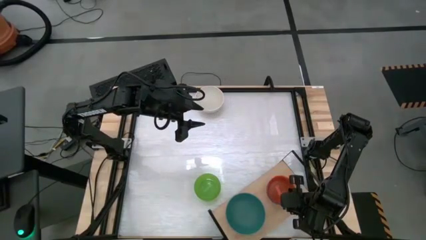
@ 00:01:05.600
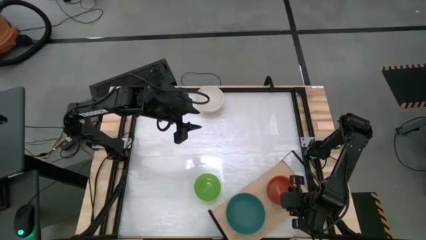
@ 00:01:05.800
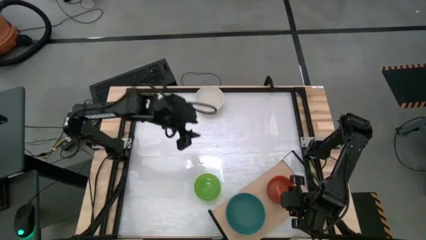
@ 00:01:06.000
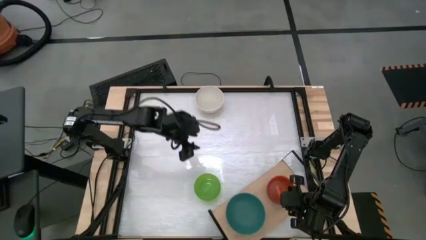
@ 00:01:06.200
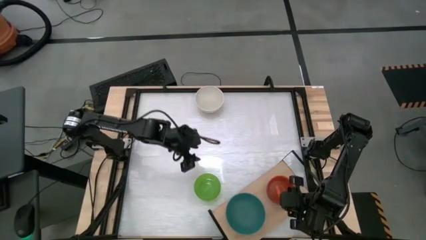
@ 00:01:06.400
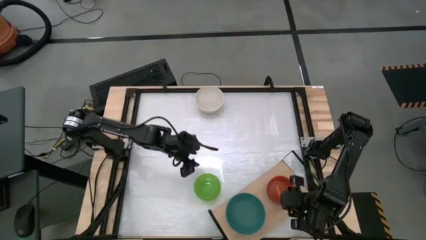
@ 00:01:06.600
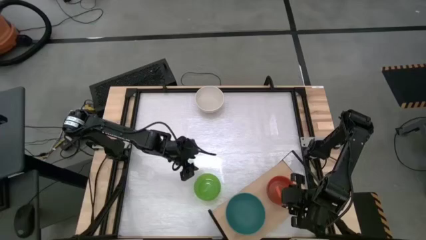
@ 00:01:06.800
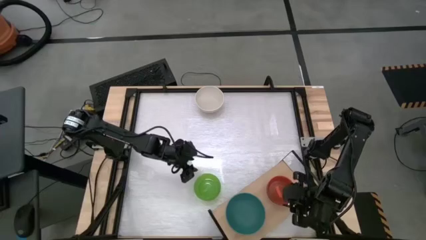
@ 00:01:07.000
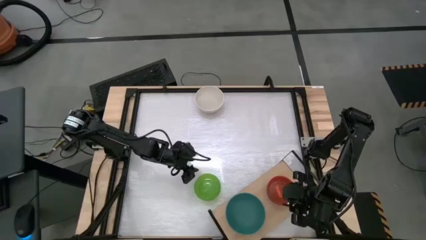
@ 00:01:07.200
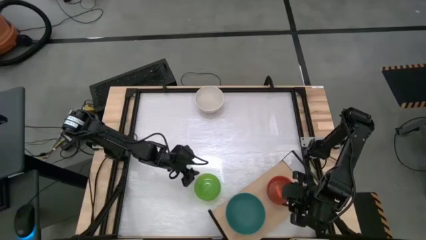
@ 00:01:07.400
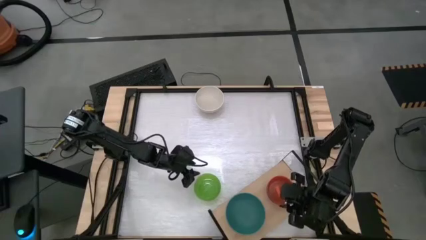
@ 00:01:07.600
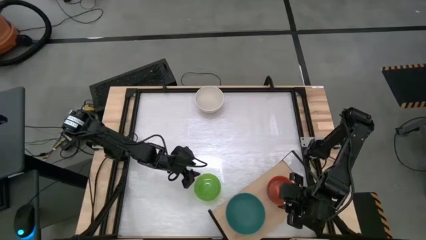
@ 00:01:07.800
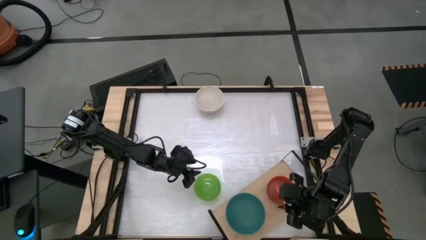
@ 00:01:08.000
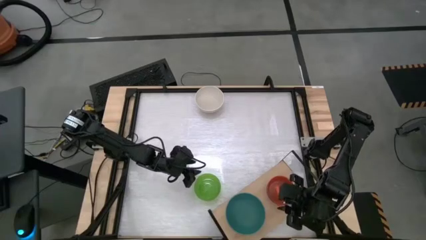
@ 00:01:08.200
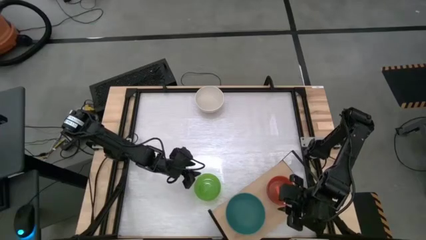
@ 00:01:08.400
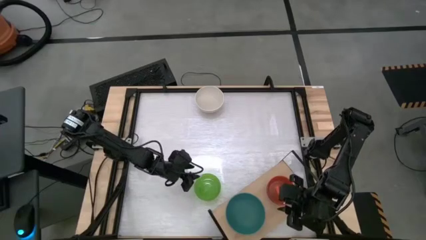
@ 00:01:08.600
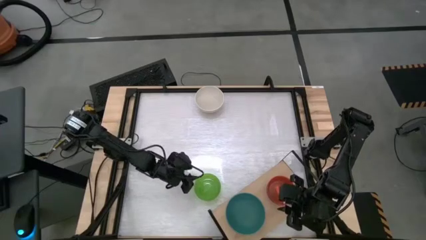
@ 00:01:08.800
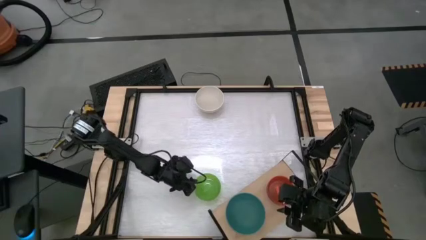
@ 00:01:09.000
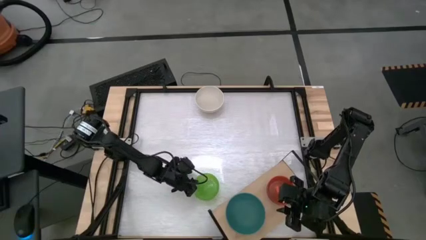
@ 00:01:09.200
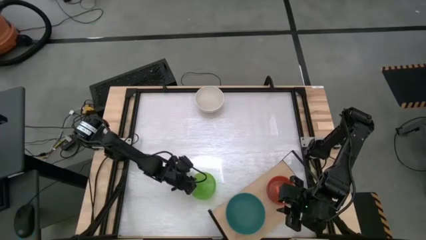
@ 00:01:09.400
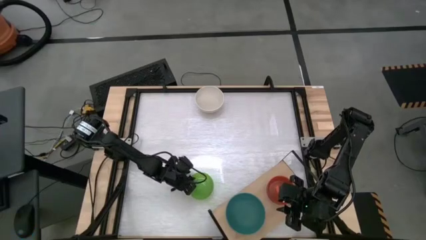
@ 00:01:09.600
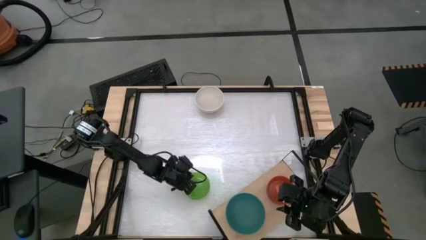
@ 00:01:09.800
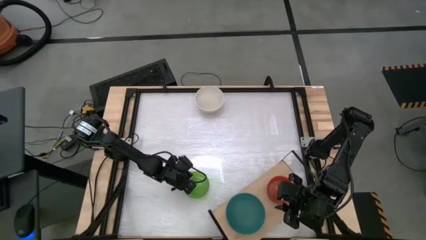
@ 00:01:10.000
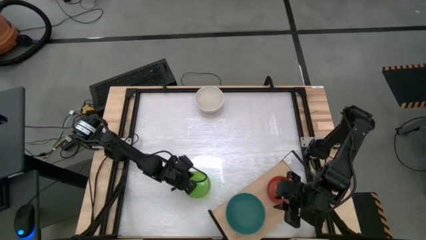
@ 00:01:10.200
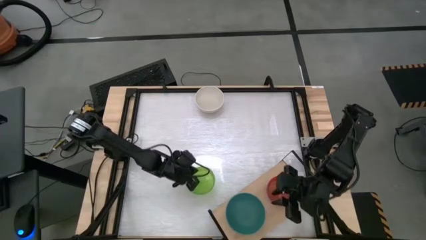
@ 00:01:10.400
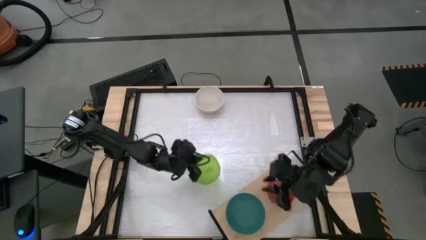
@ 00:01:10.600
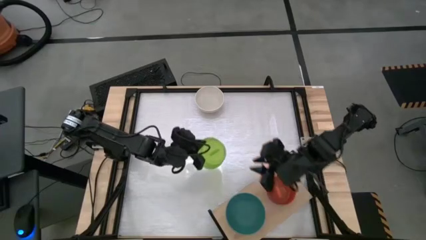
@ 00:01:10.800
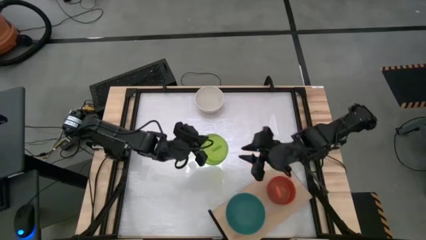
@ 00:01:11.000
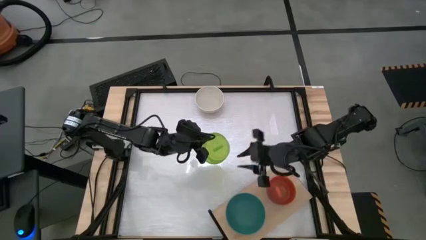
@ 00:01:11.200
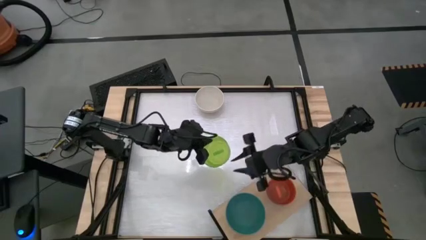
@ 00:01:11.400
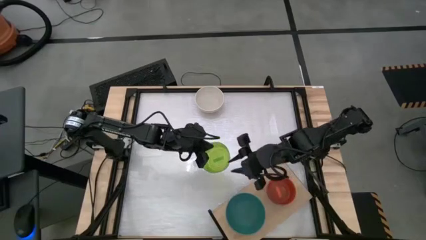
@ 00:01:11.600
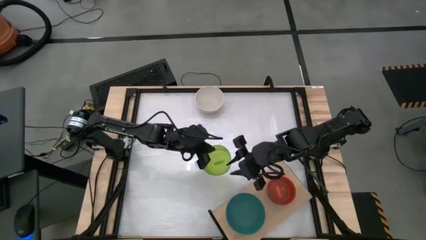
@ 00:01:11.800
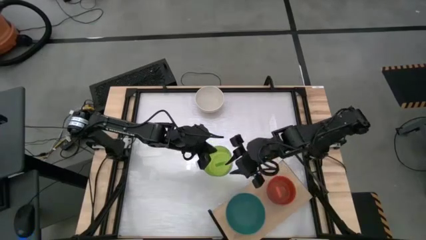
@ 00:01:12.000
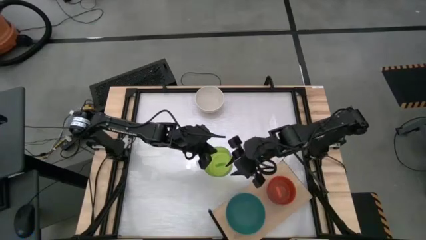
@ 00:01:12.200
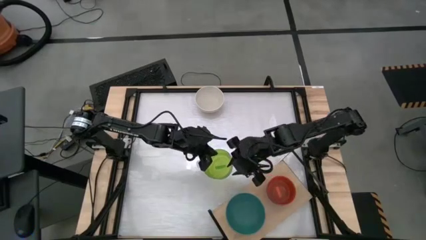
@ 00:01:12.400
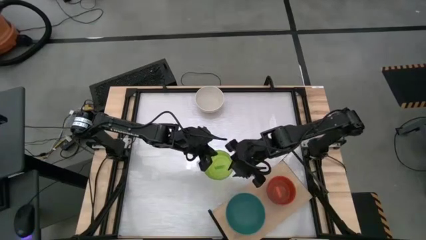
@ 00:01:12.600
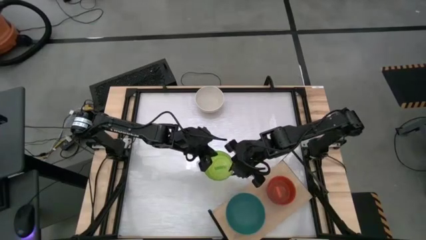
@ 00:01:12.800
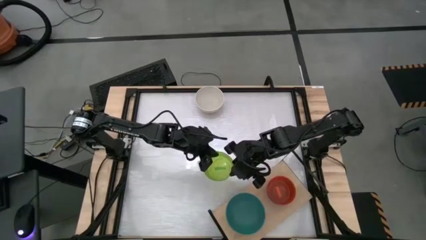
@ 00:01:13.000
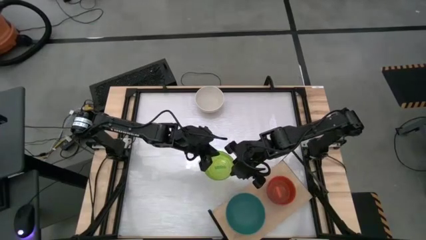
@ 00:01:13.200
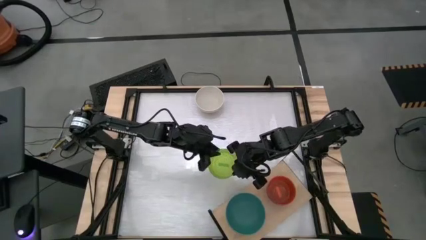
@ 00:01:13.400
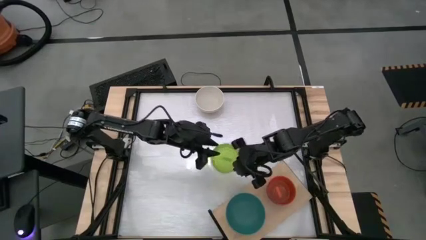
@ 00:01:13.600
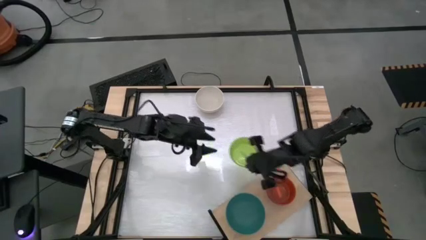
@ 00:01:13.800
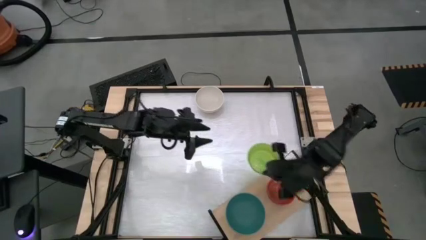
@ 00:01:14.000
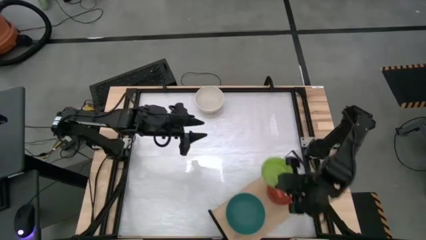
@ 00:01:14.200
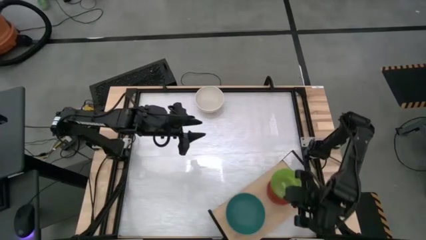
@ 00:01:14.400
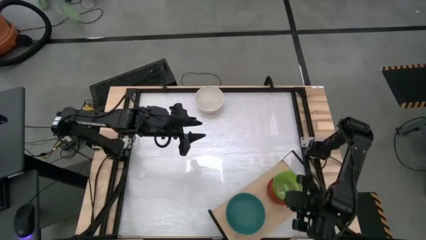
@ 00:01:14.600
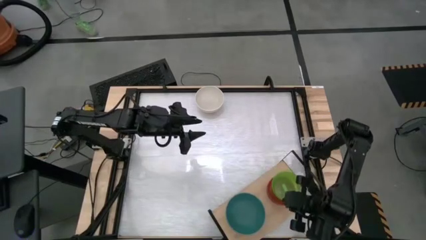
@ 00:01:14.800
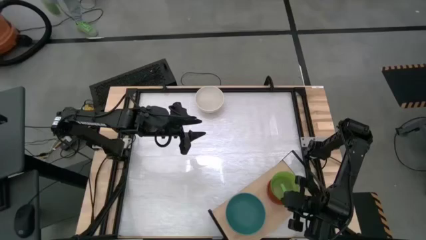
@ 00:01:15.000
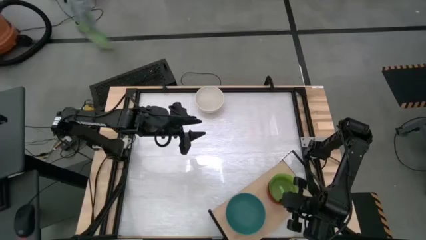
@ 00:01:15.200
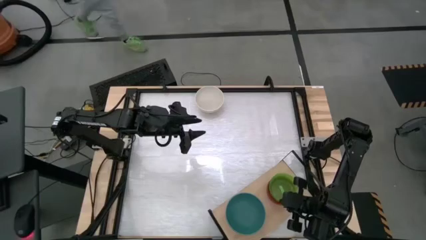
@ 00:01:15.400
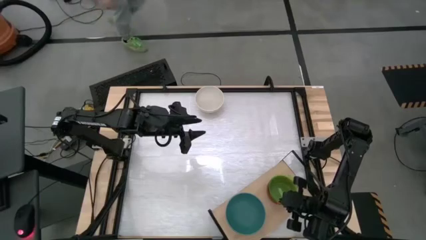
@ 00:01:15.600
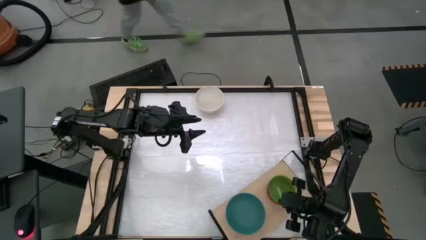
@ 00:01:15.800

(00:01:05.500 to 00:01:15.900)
Task: Place and stack bowls onto a shelf
Stack the green bowl on top of the orange bowl on the shelf

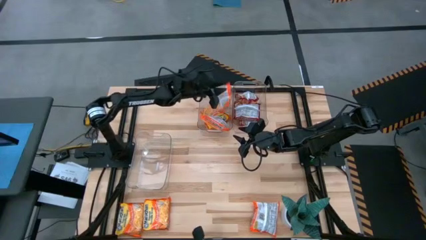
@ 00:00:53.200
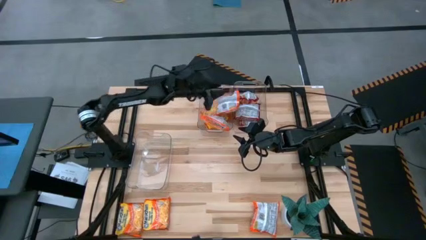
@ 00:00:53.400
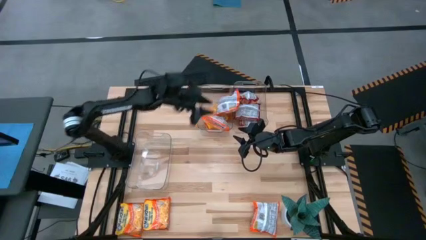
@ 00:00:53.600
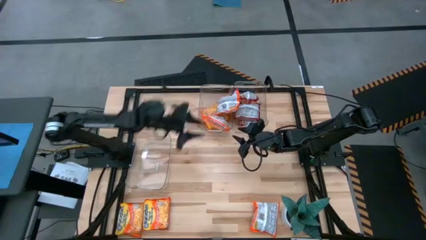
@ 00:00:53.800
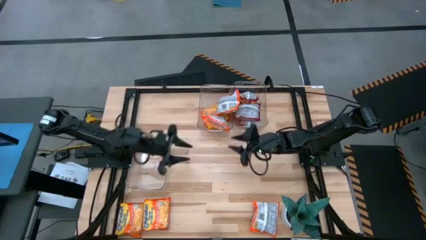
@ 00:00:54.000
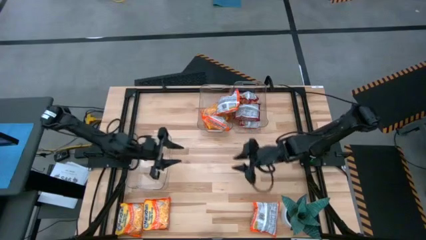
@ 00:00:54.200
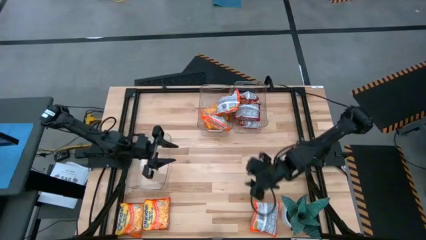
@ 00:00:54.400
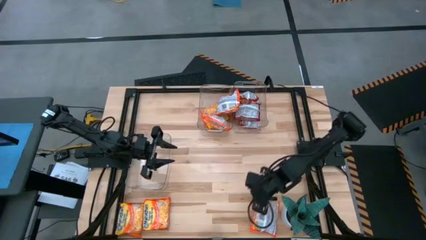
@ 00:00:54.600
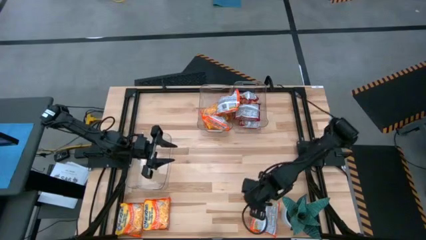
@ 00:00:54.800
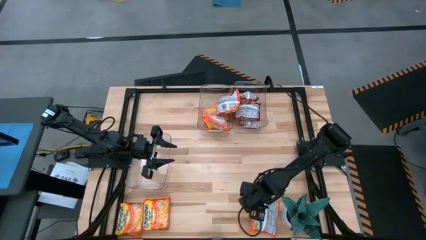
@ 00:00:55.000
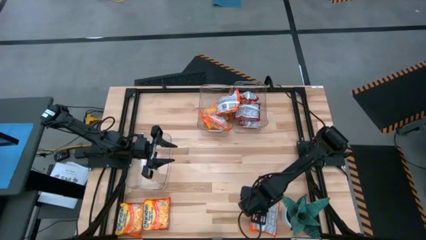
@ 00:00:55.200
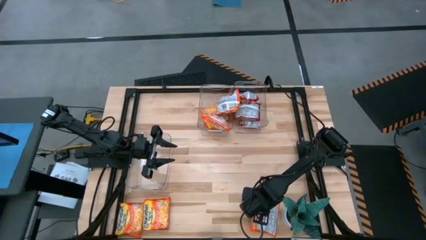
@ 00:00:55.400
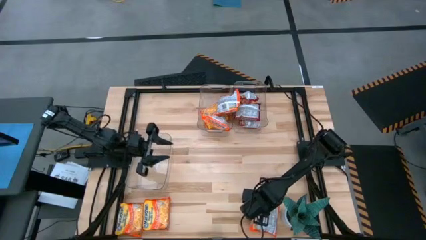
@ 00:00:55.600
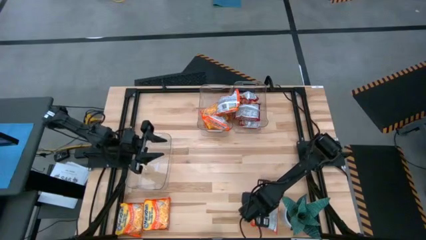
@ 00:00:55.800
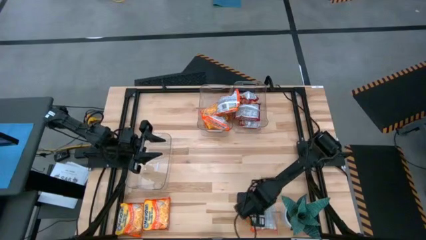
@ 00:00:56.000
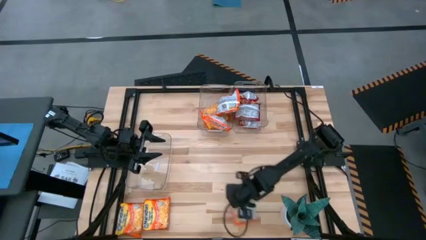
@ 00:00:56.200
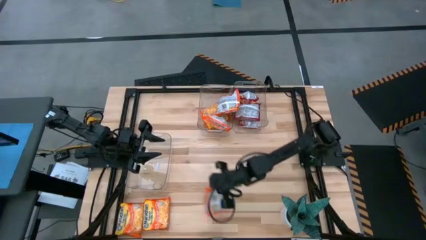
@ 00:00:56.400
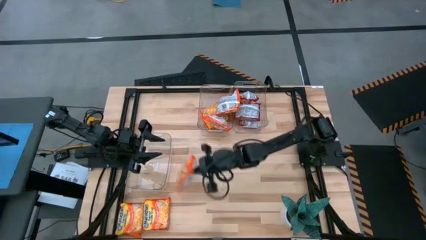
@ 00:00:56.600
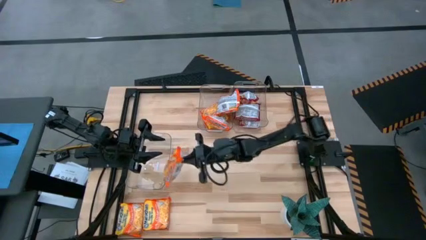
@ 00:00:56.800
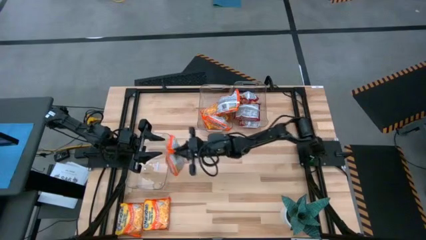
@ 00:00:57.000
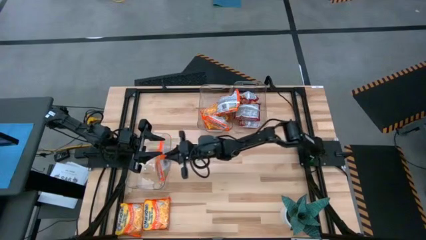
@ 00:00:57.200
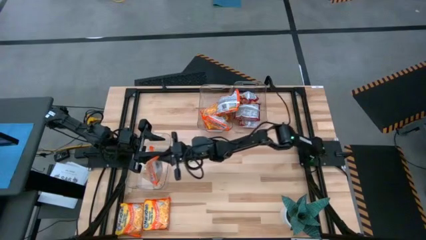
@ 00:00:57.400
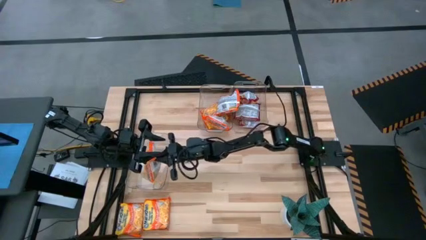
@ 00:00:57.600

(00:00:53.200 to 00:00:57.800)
Task: Sort Maruchan noodles
Put the orange noodle pack into the bottom left transparent bin
